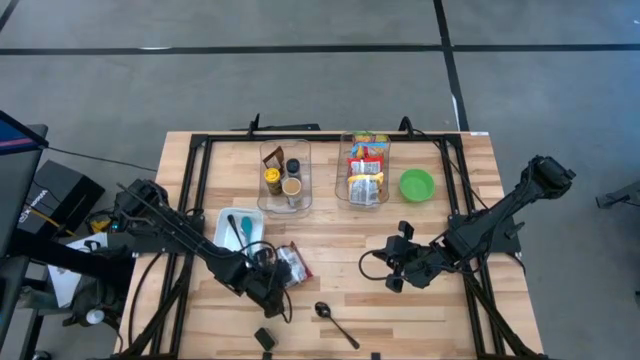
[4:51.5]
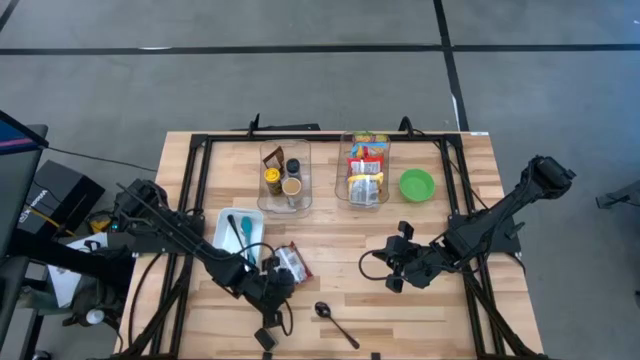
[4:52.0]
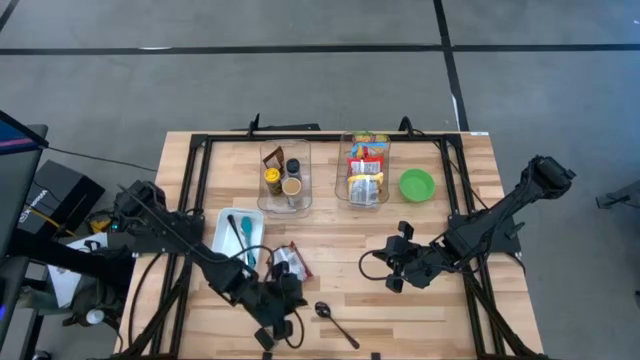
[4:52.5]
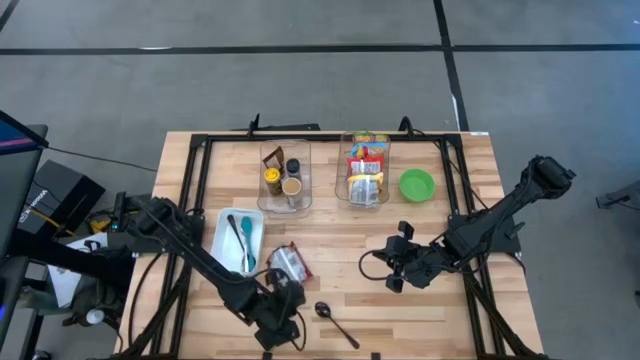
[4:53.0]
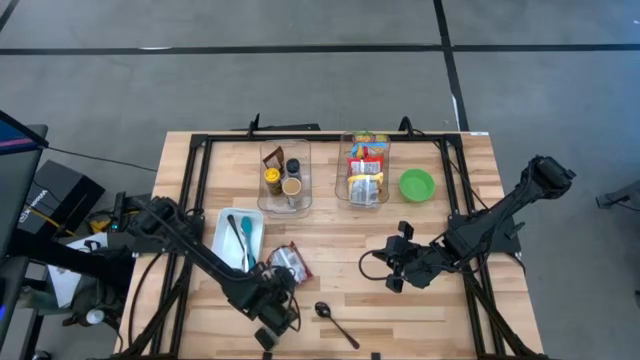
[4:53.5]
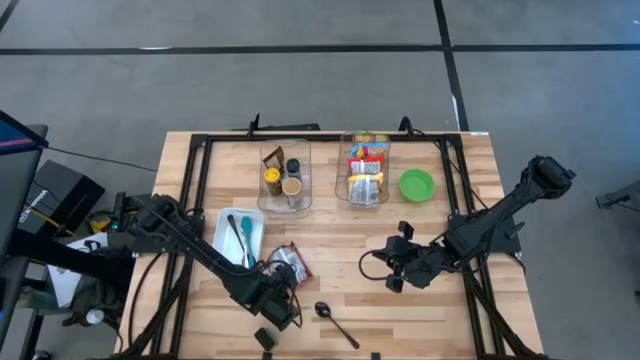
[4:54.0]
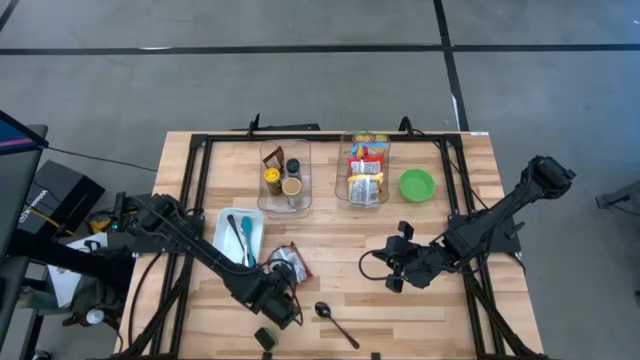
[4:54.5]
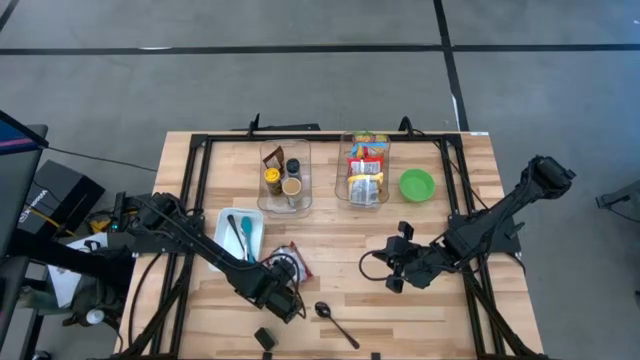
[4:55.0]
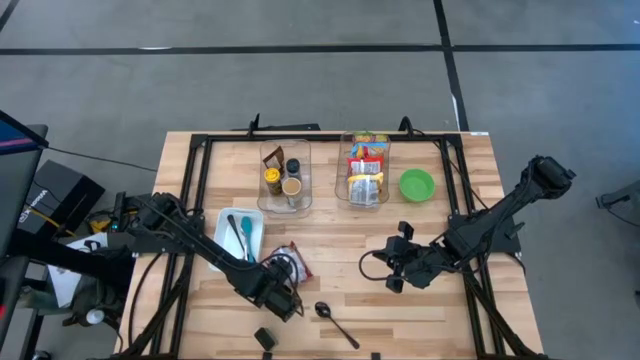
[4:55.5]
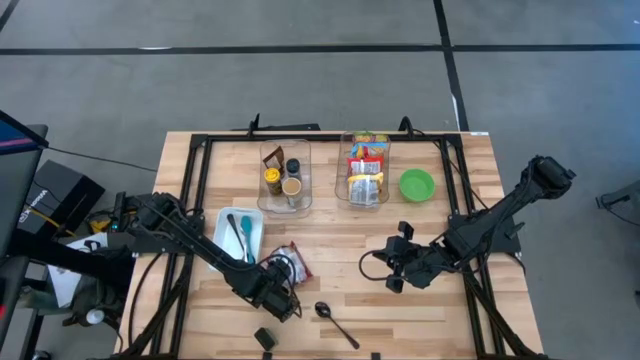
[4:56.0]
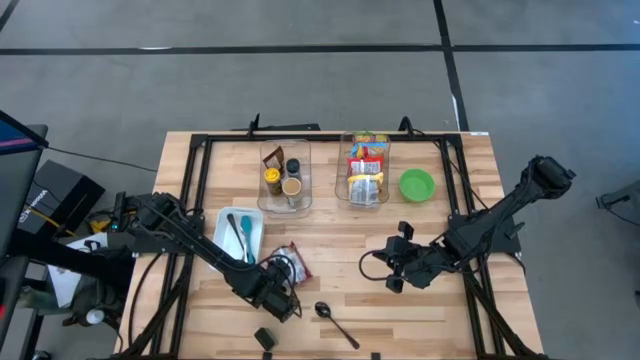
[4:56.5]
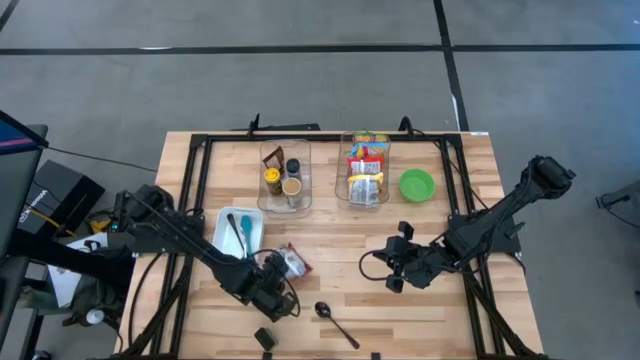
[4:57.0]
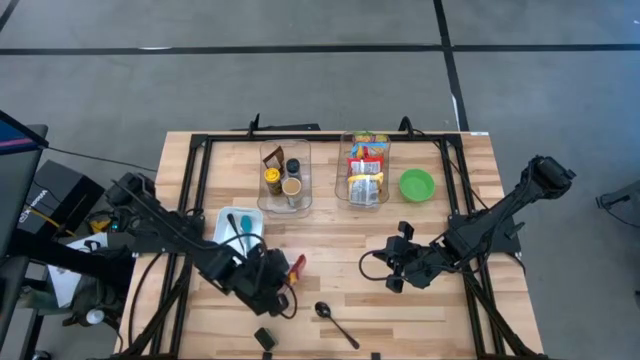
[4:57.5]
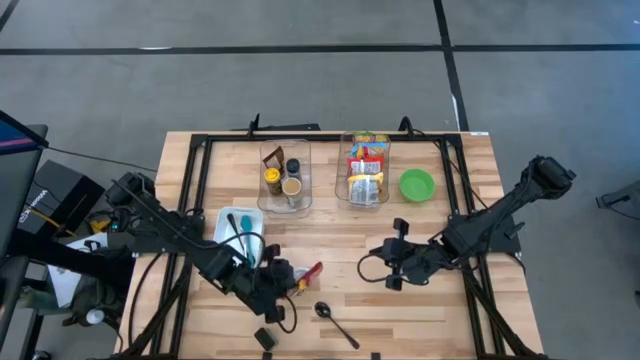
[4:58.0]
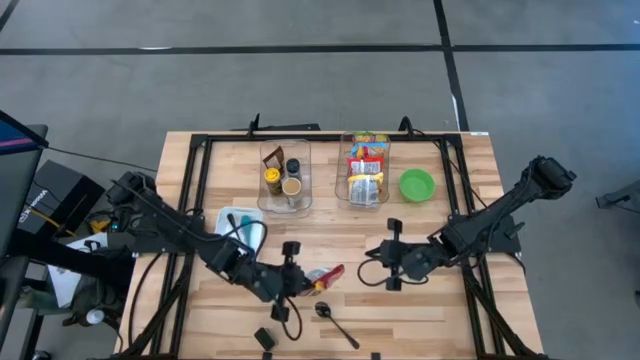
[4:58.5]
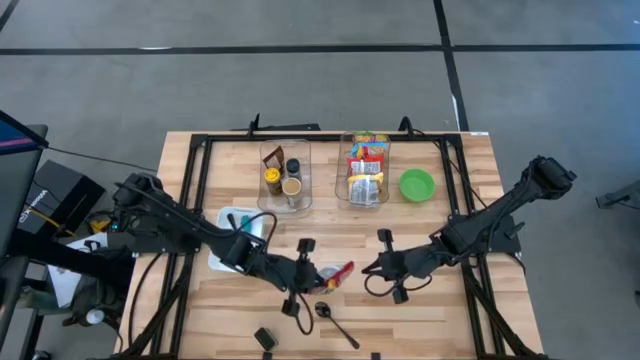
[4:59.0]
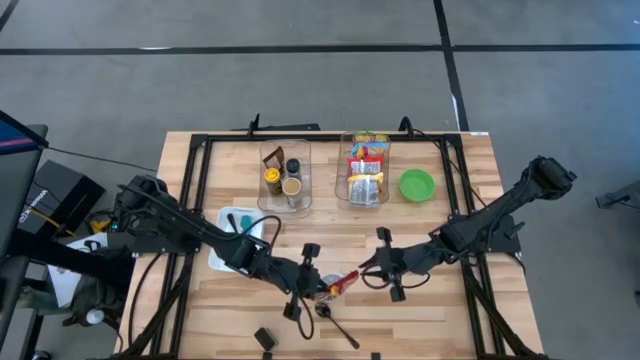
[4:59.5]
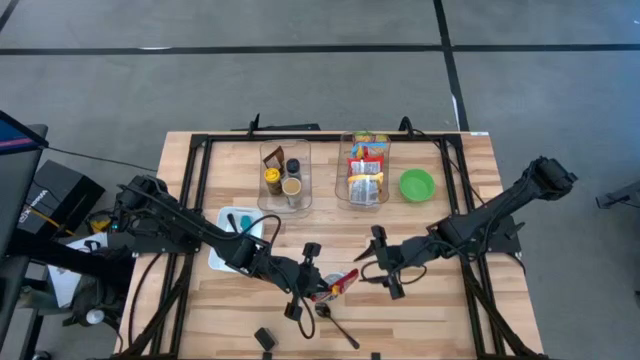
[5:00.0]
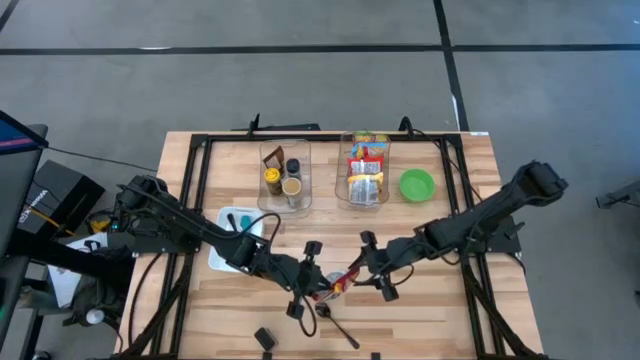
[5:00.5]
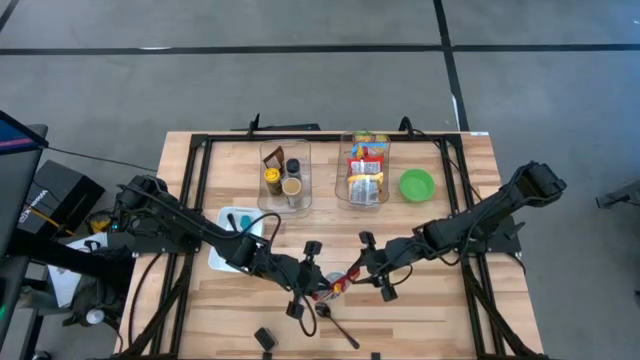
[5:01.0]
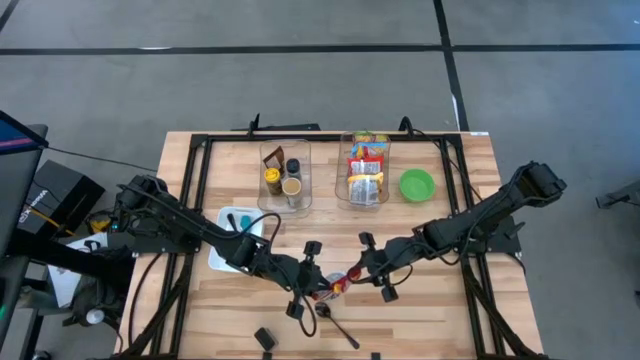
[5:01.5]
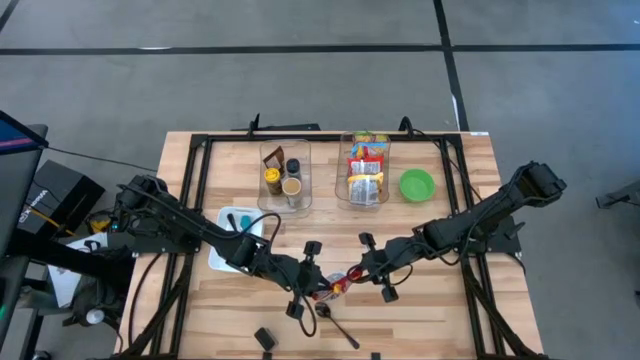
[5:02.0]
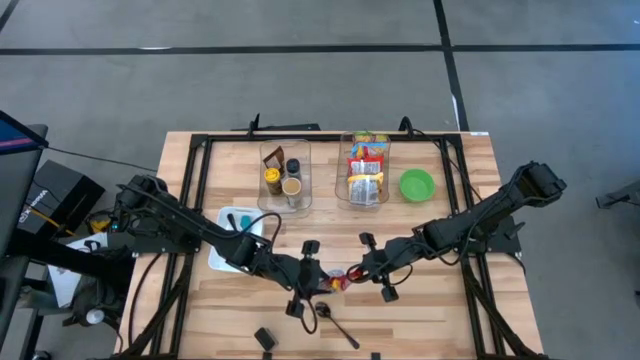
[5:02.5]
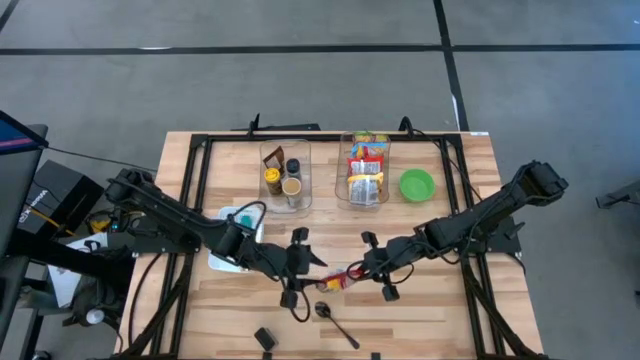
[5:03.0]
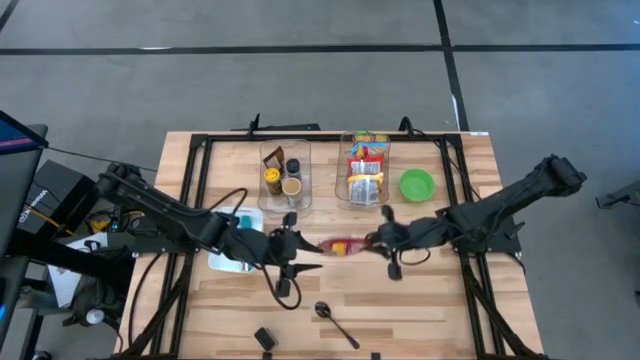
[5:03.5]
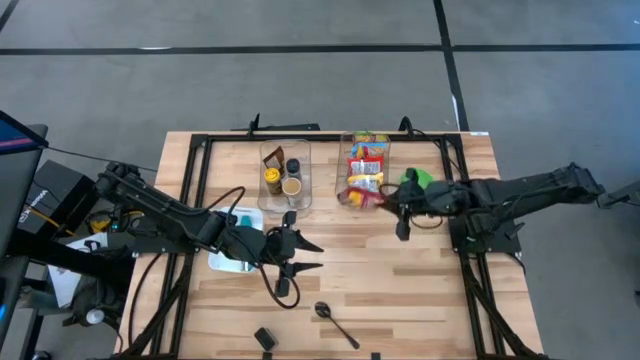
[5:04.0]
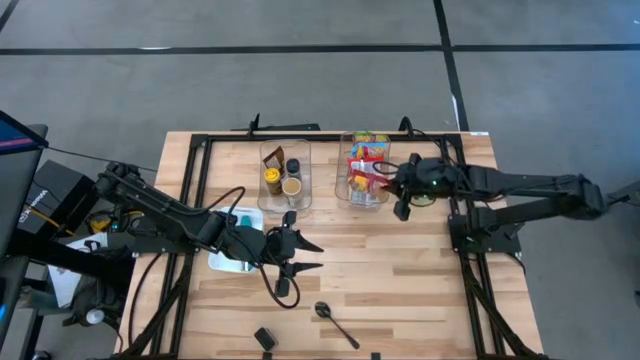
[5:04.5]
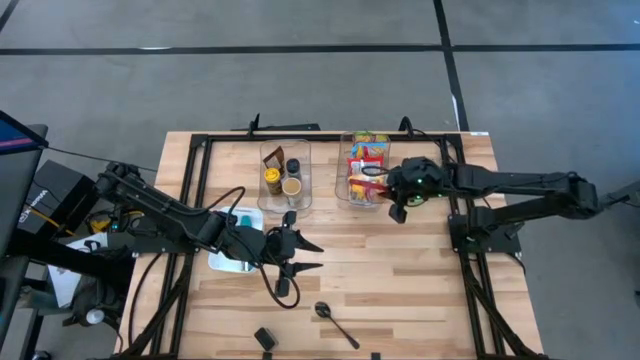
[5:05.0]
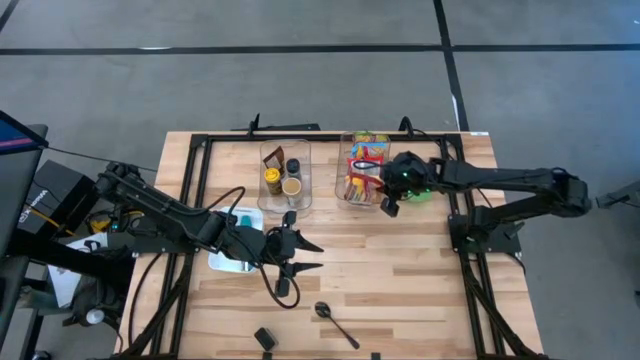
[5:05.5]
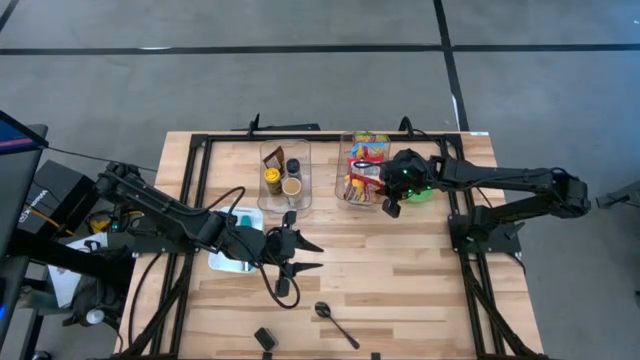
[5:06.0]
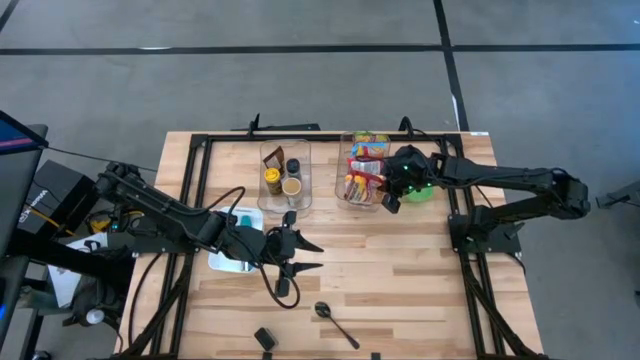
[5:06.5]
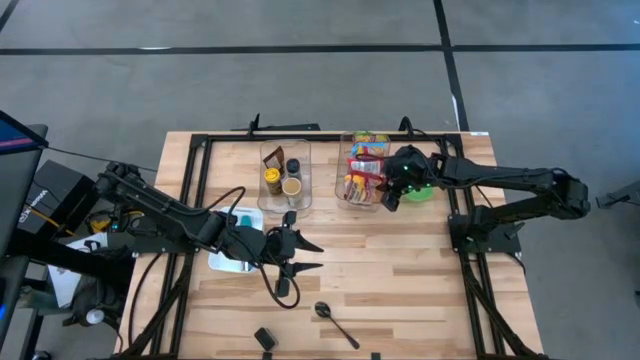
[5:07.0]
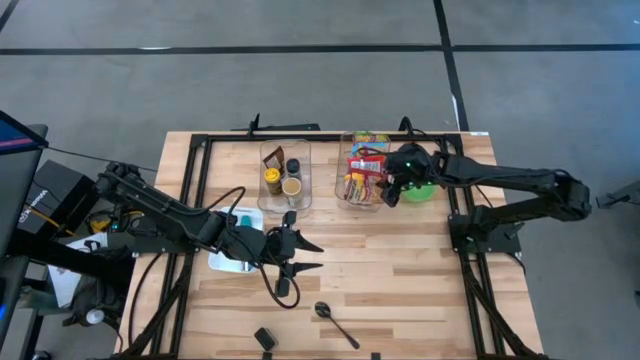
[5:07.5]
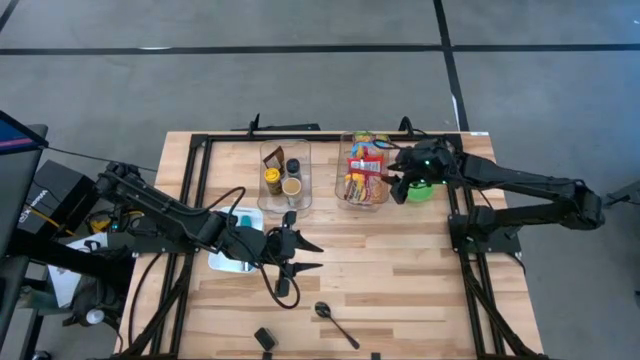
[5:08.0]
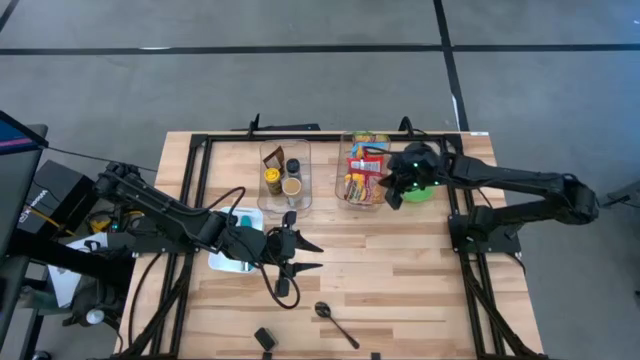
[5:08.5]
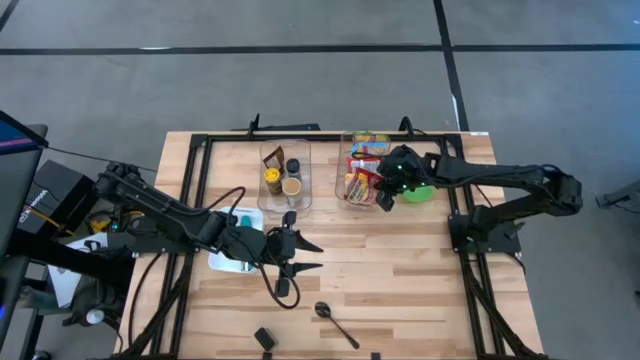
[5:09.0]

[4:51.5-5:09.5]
Task: Pick & Place Food Item
Put the dark red noodle pack into the right transparent bin

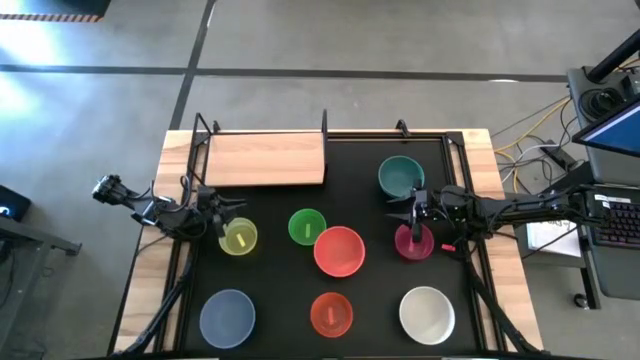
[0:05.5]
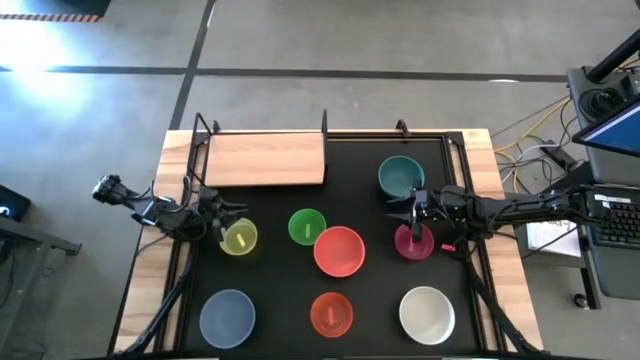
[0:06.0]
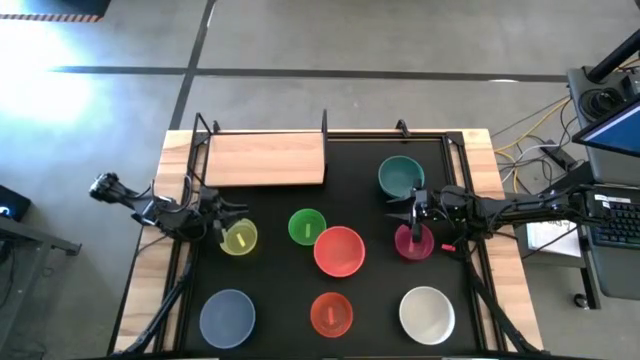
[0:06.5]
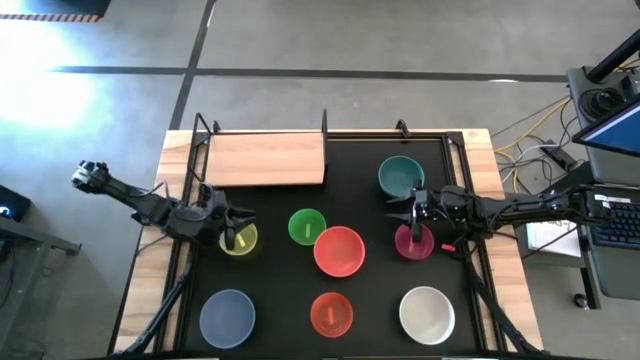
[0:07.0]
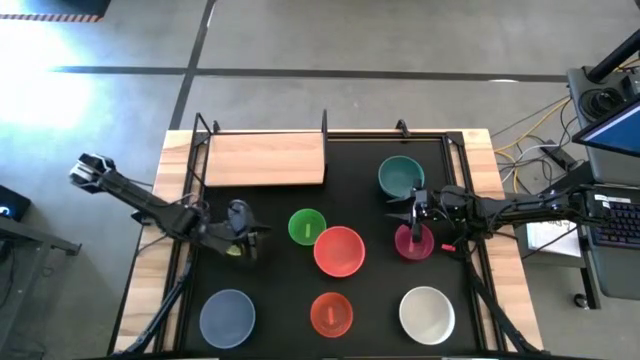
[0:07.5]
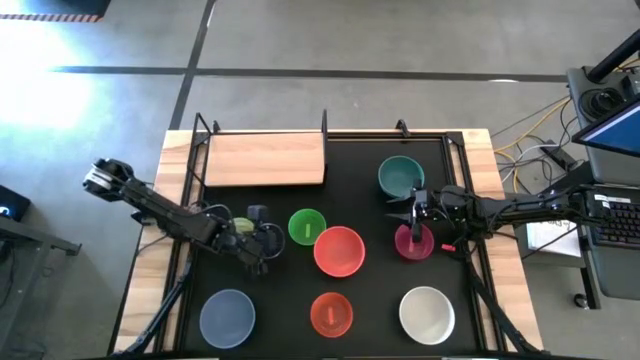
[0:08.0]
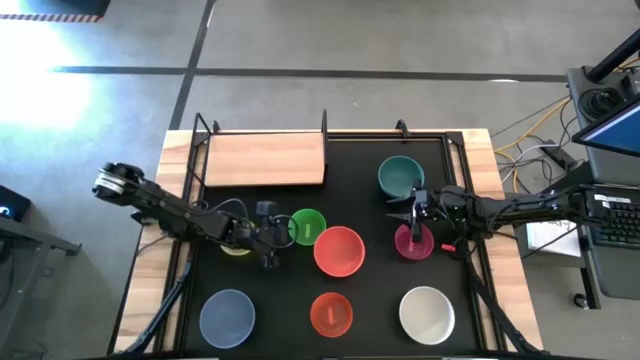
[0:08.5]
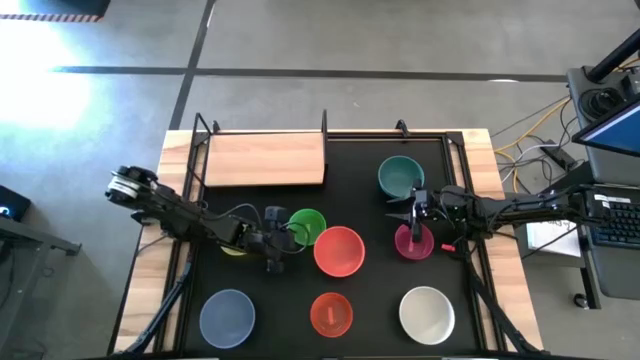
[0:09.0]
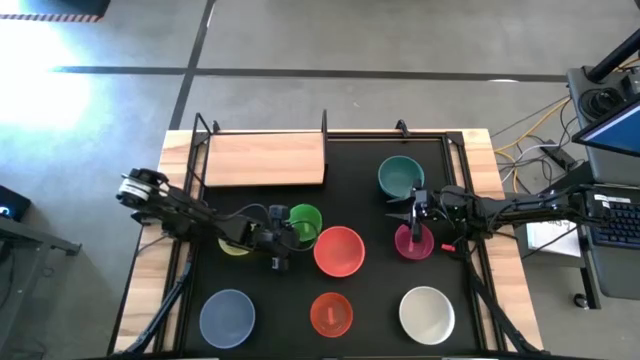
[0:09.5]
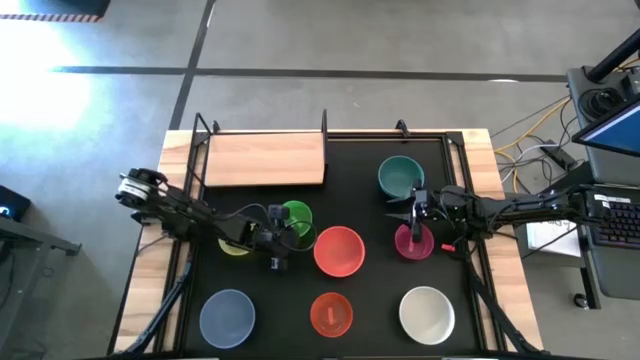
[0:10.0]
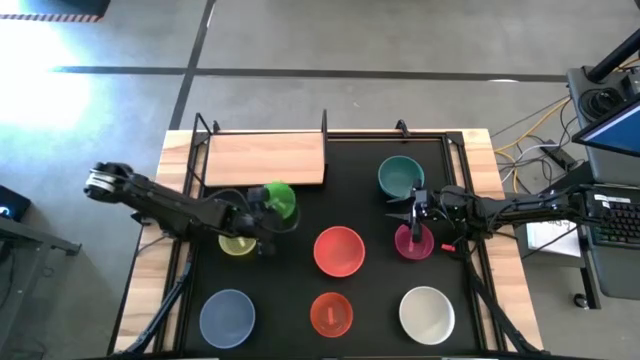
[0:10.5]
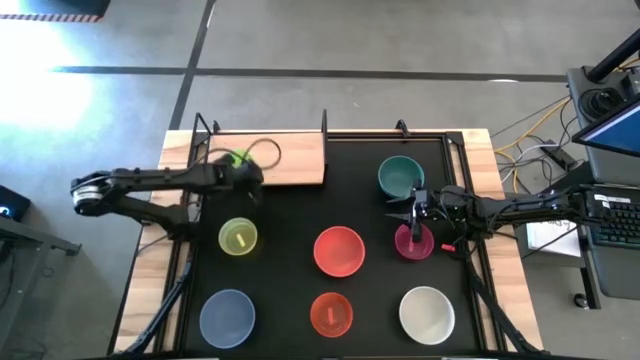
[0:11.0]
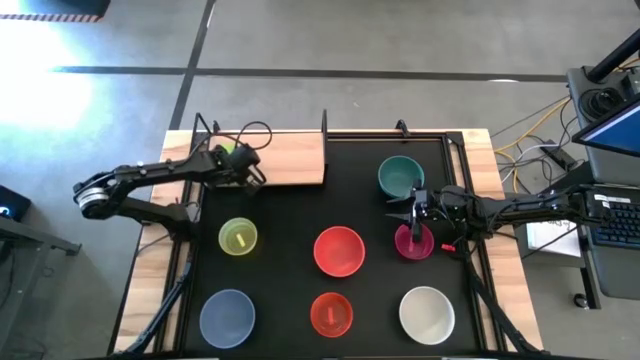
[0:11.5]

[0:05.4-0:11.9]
Task: Place and stack bowls onto a shelf
Put the small green bowl on the shelf
